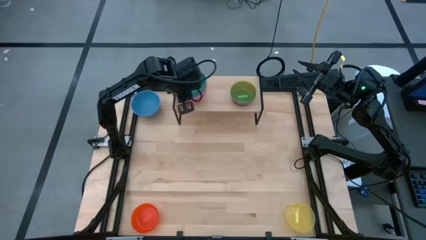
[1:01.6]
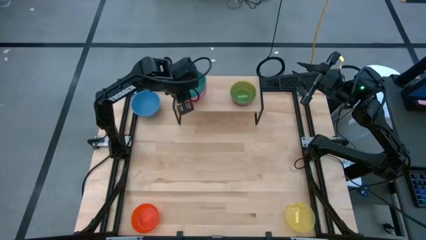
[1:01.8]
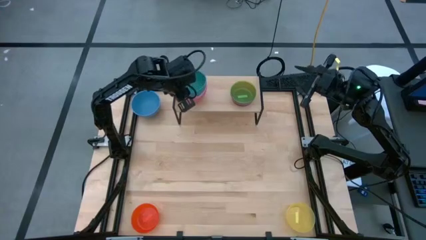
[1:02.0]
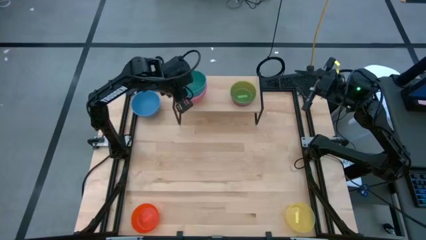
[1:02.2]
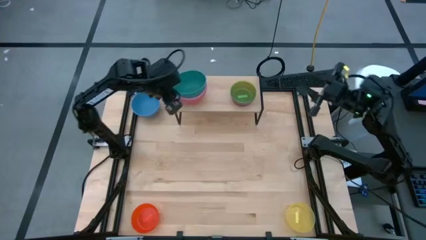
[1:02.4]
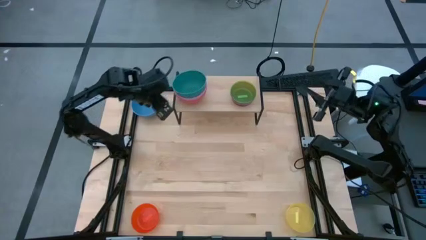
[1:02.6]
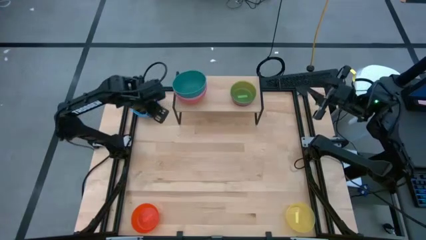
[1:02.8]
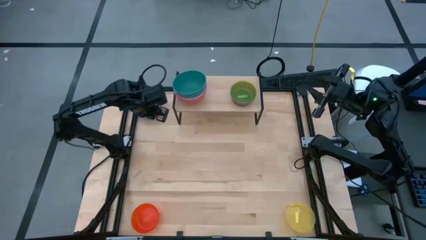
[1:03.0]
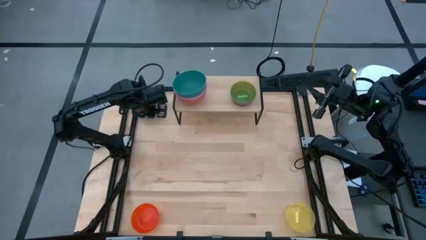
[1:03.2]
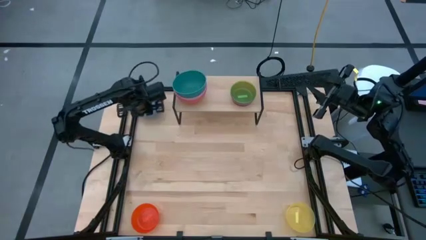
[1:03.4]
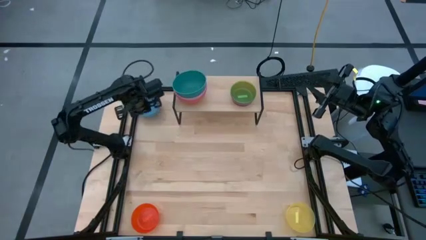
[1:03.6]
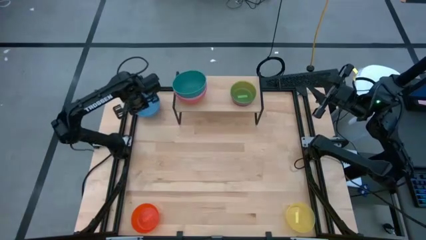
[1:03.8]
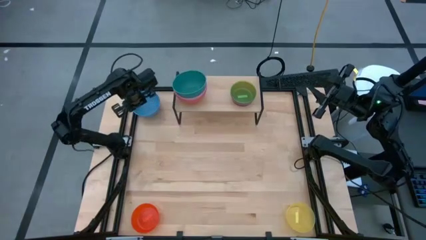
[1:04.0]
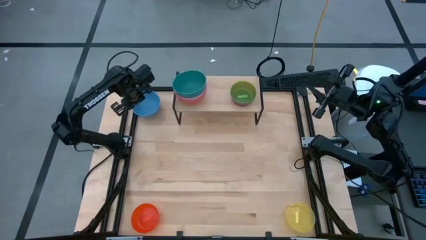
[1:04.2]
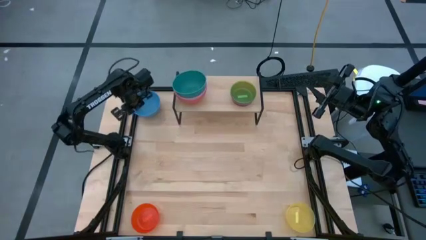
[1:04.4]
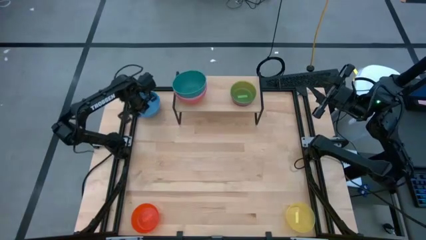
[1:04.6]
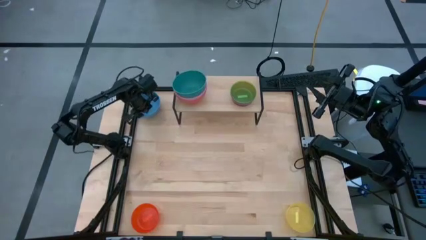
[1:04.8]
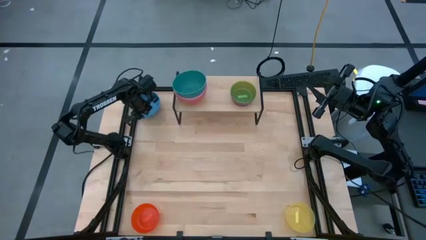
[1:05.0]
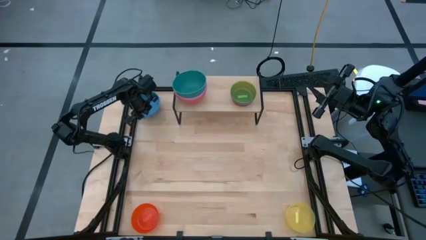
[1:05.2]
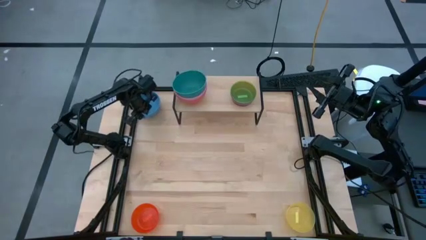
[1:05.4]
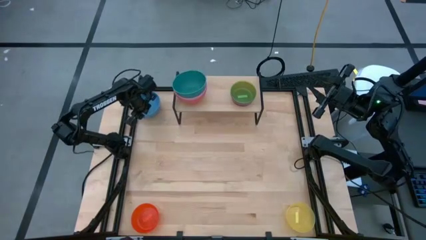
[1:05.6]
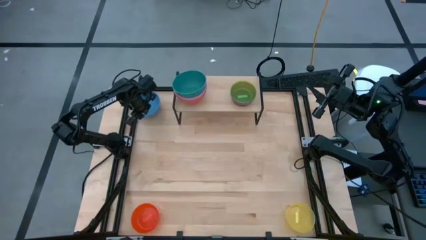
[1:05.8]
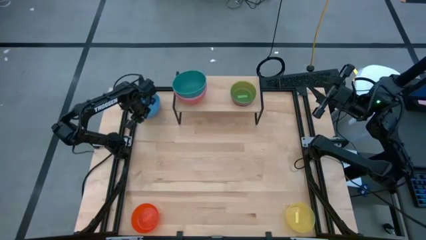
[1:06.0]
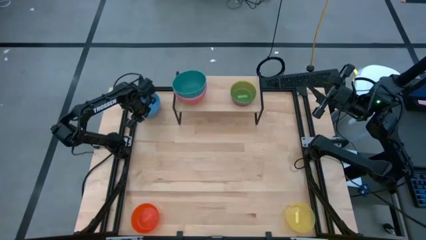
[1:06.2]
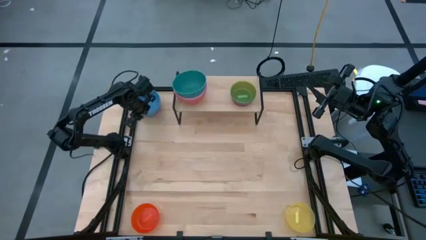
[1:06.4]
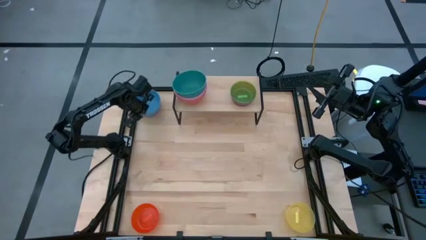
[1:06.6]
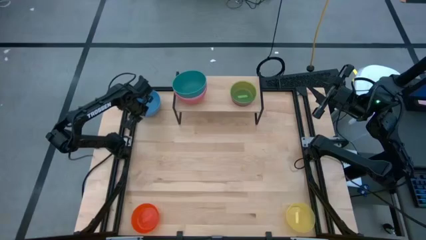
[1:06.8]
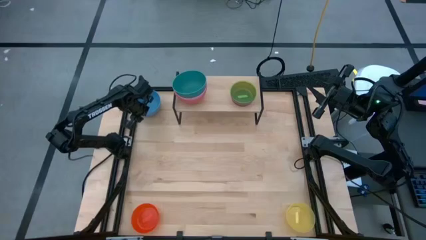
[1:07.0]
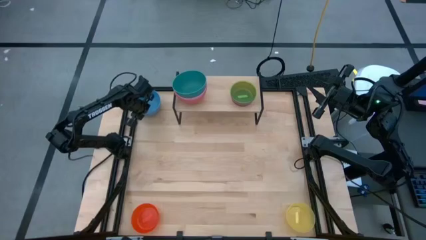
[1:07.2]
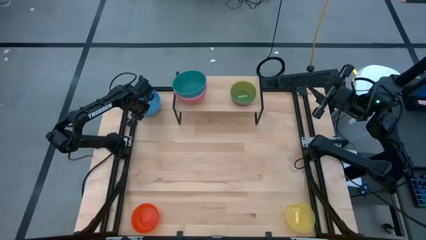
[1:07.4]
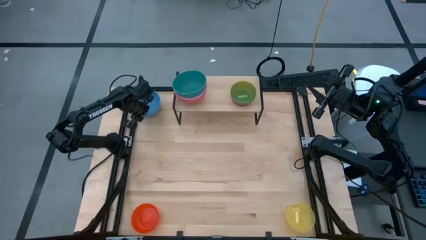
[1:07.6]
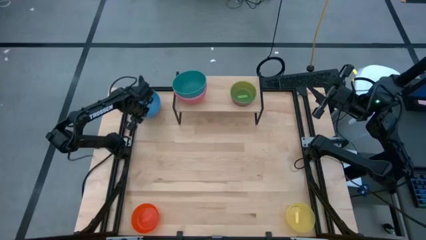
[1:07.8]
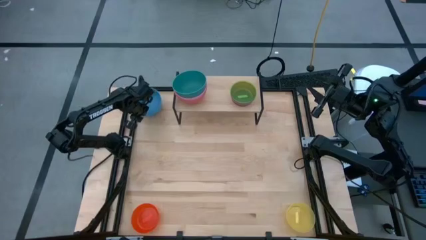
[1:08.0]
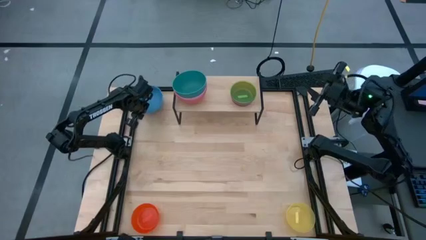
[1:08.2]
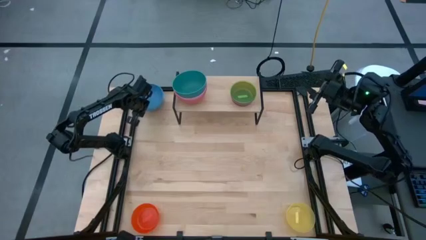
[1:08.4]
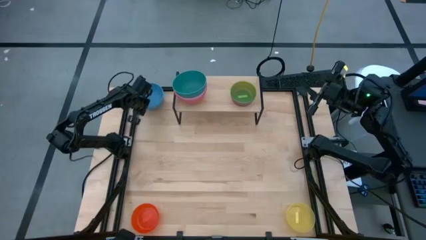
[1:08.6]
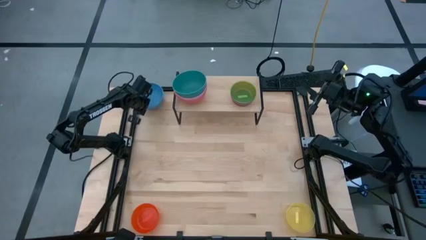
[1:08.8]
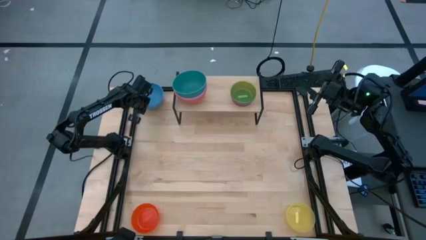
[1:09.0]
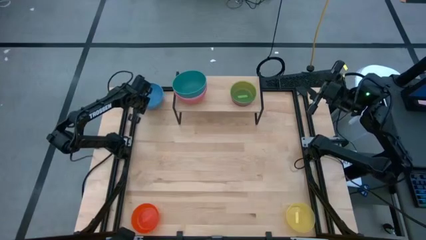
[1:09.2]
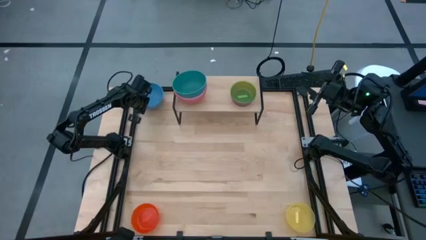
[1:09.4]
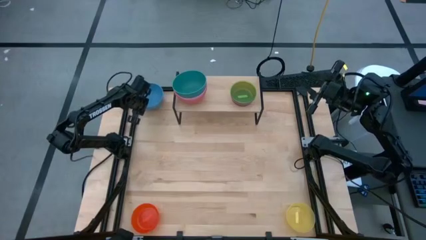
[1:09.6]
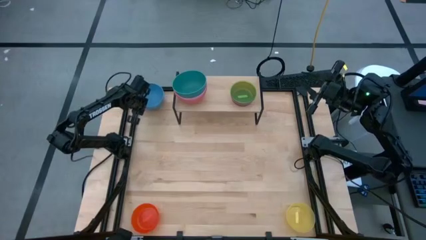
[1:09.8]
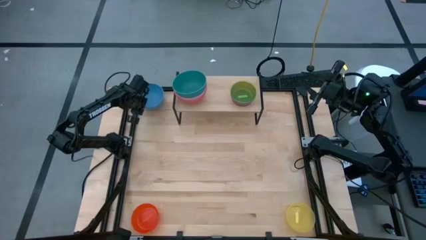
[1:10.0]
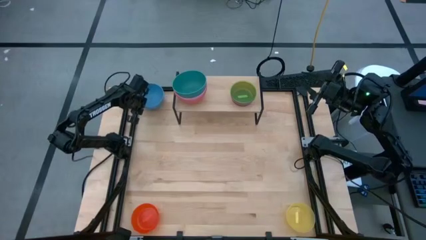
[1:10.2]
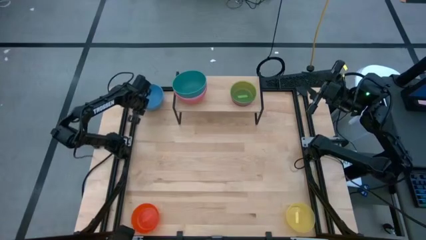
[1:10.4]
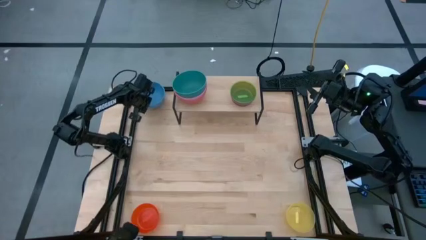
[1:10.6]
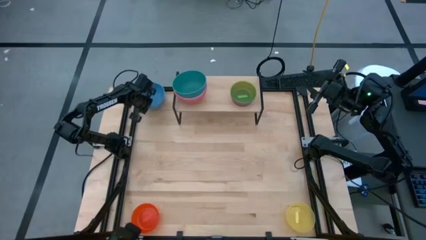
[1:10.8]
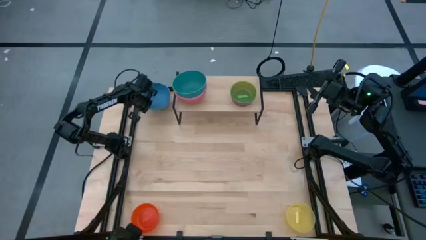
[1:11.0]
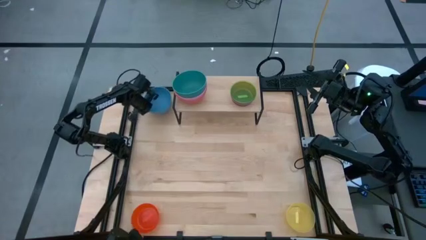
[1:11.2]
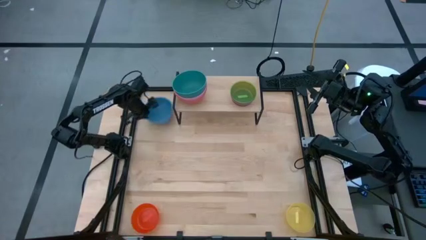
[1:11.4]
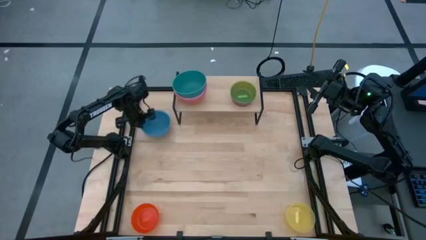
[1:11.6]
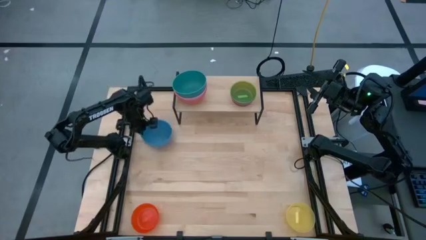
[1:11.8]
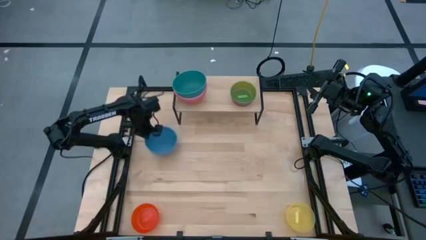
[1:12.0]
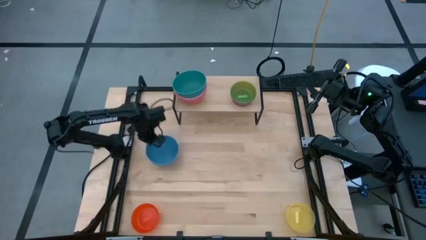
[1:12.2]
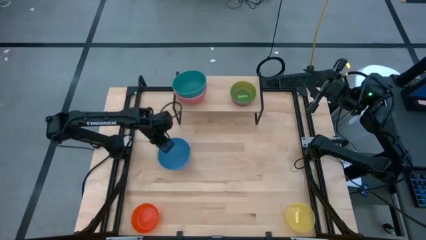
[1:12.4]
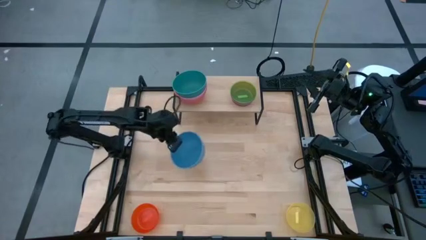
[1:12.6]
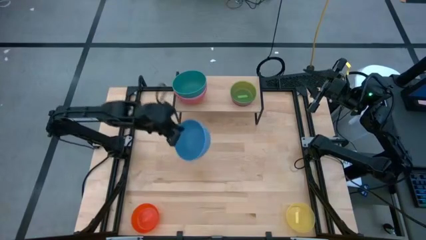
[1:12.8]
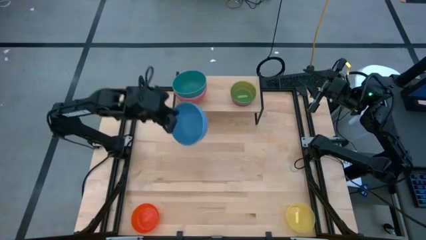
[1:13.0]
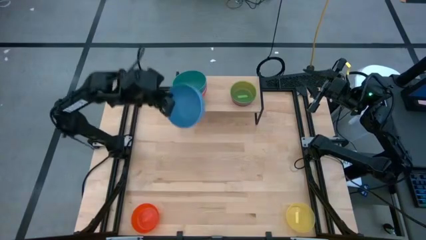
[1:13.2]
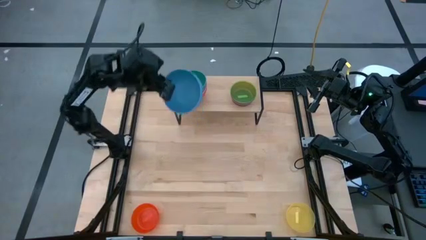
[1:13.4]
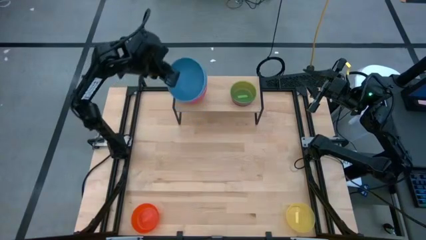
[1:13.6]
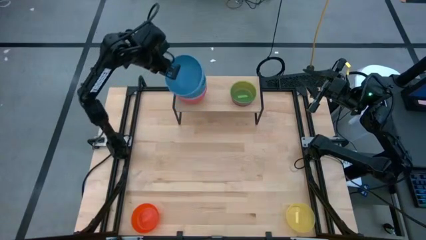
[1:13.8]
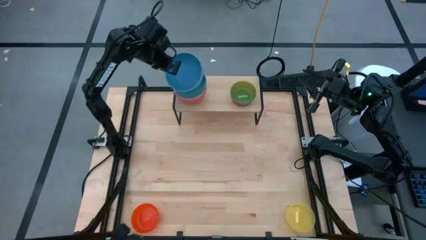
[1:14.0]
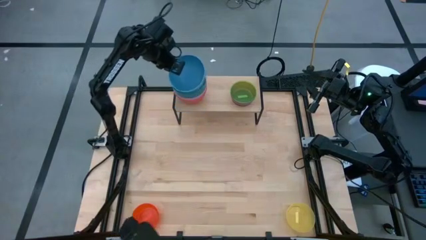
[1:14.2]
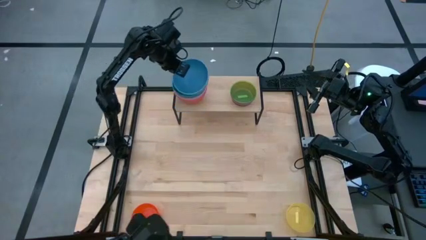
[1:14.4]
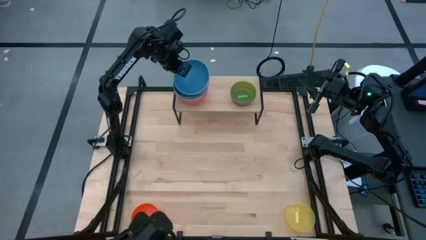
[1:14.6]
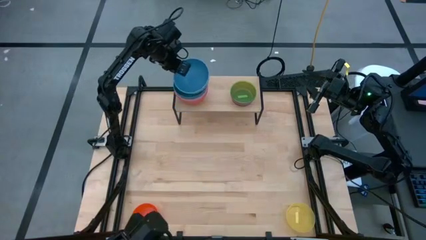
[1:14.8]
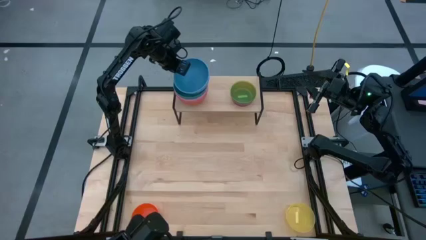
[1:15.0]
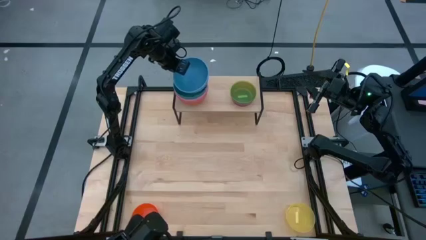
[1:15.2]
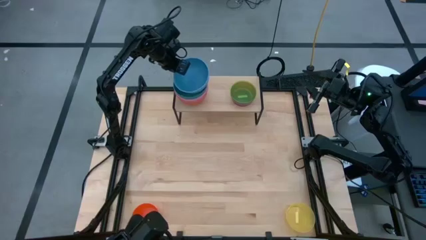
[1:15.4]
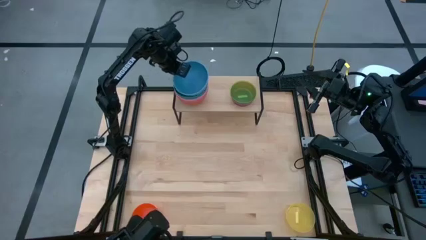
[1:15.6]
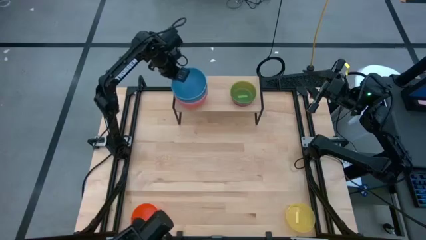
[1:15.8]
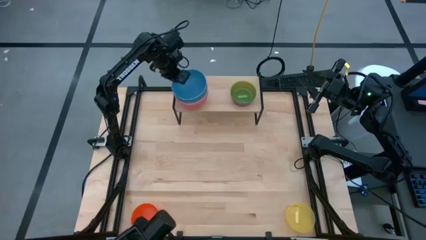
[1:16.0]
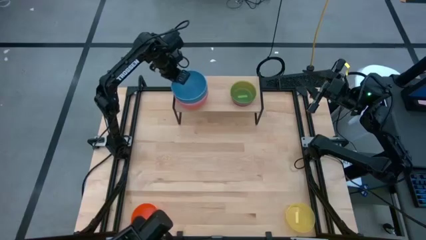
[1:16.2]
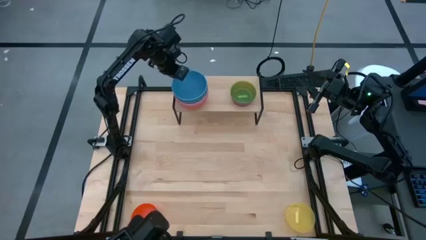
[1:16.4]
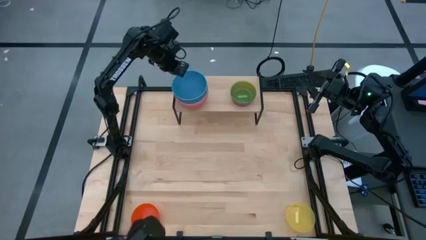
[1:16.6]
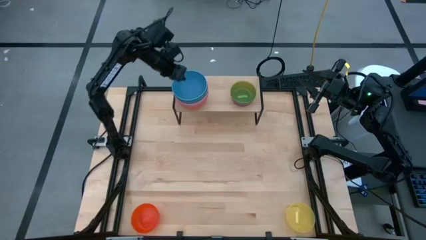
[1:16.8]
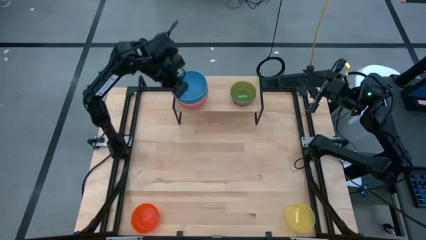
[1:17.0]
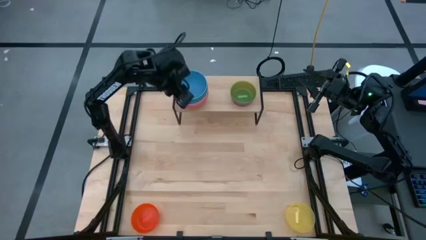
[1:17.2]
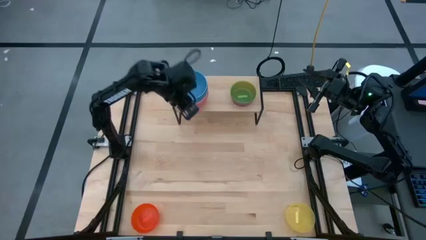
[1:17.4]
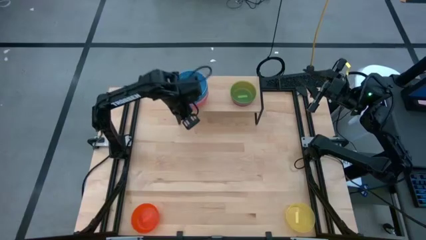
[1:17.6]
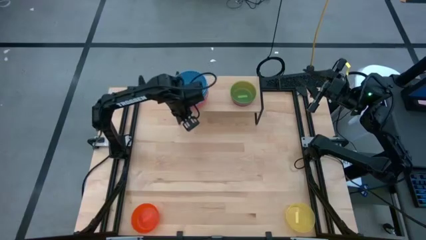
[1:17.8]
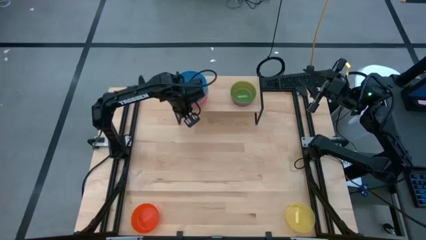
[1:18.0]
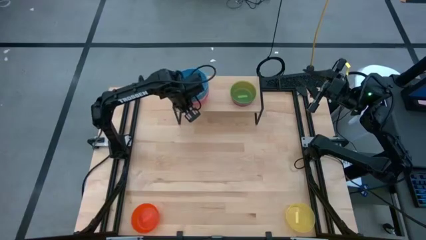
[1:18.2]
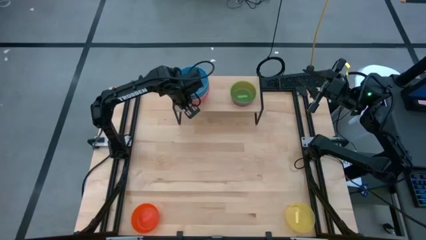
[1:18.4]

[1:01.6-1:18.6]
Task: Place and stack bowls onto a shelf
Stack the blue bowl on top of the dark green bowl on the shelf
